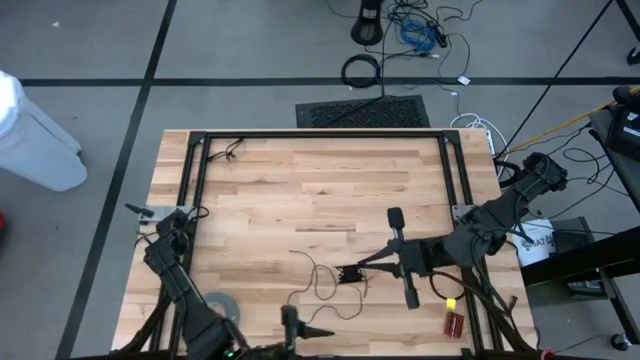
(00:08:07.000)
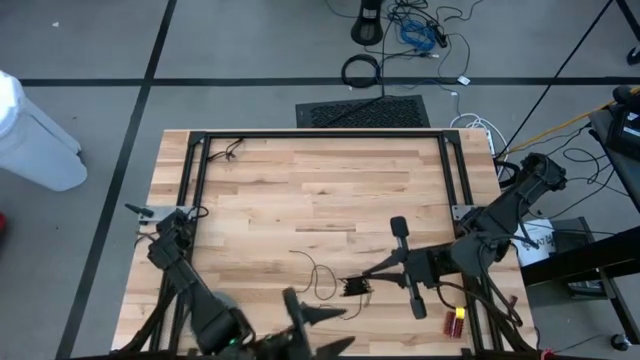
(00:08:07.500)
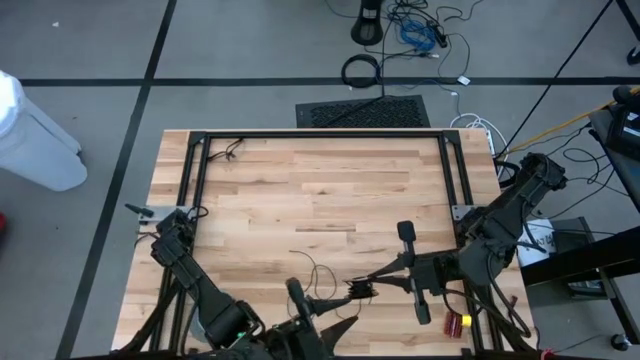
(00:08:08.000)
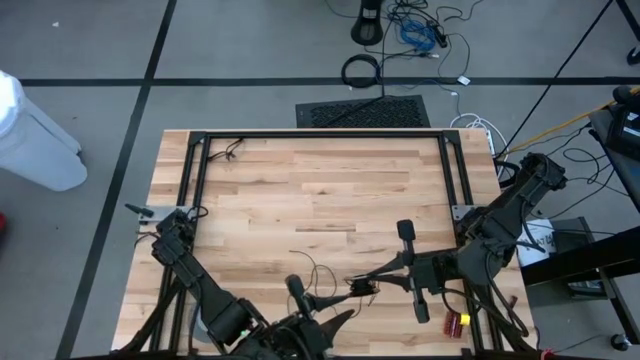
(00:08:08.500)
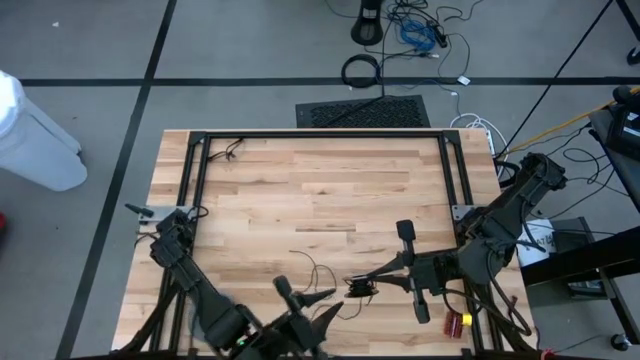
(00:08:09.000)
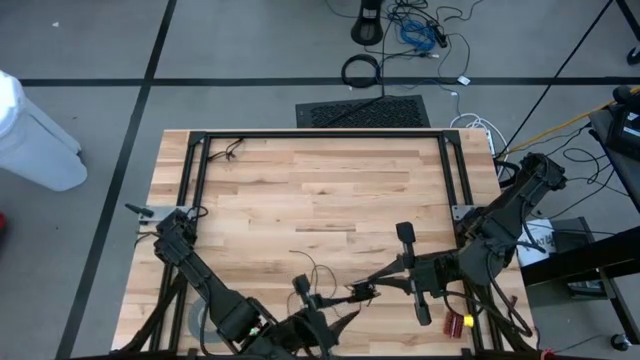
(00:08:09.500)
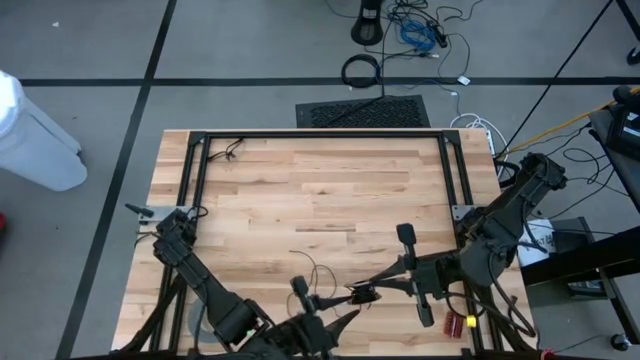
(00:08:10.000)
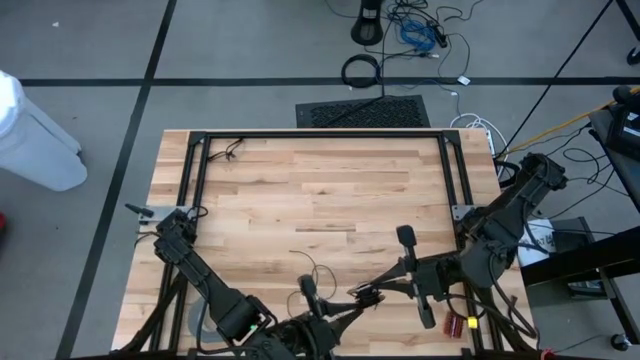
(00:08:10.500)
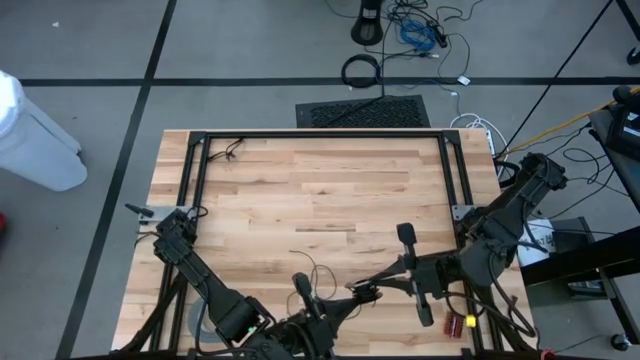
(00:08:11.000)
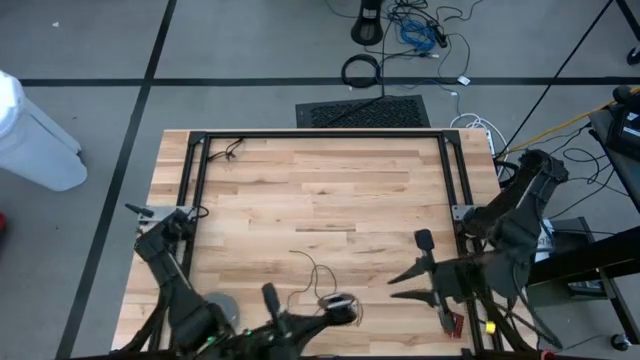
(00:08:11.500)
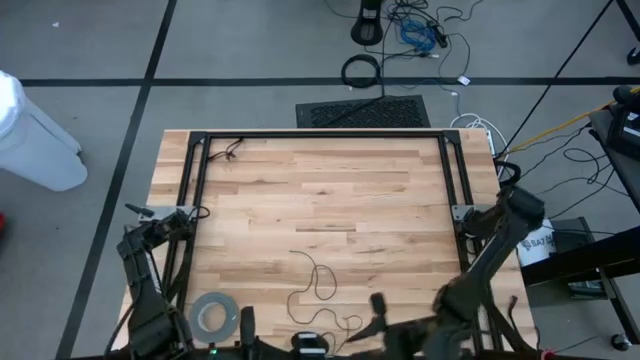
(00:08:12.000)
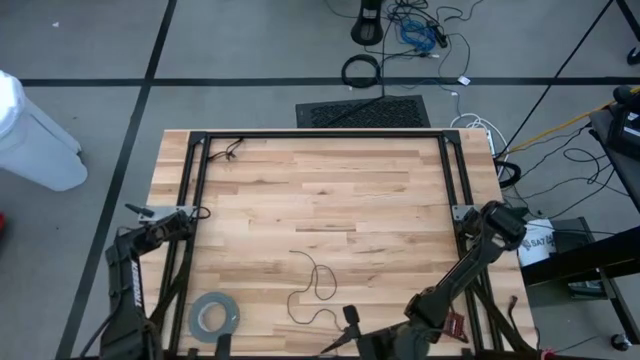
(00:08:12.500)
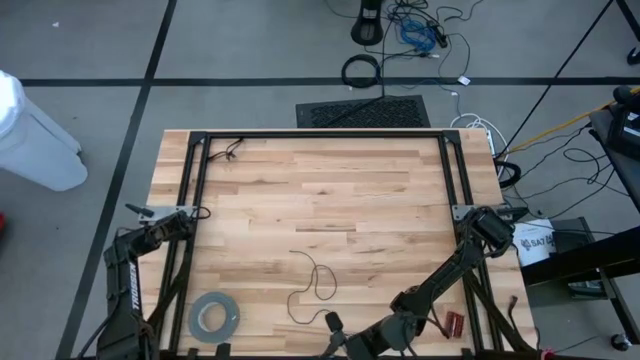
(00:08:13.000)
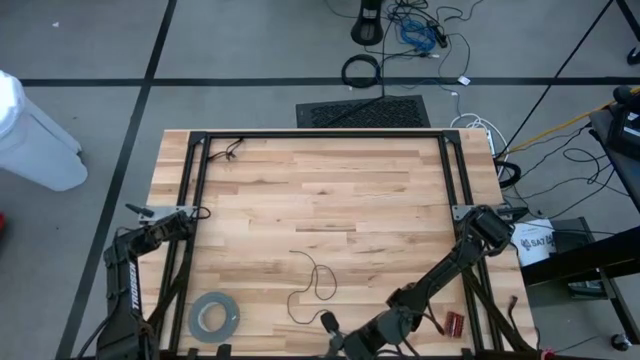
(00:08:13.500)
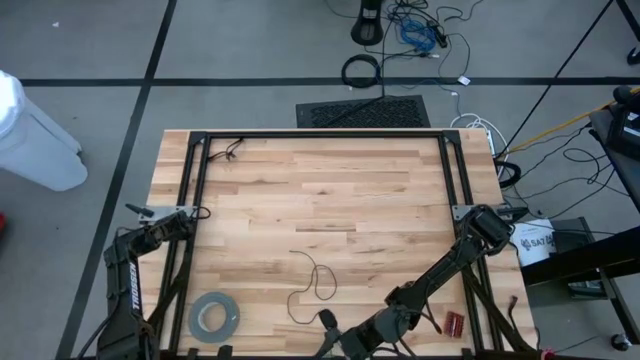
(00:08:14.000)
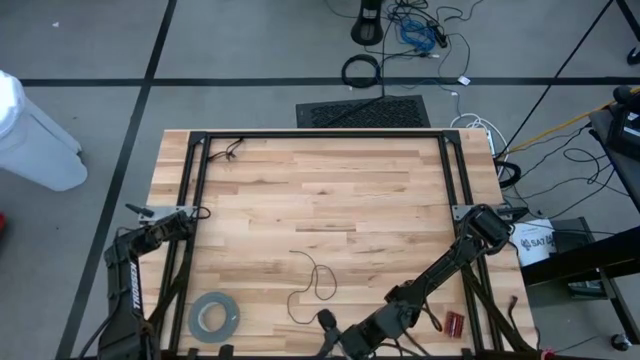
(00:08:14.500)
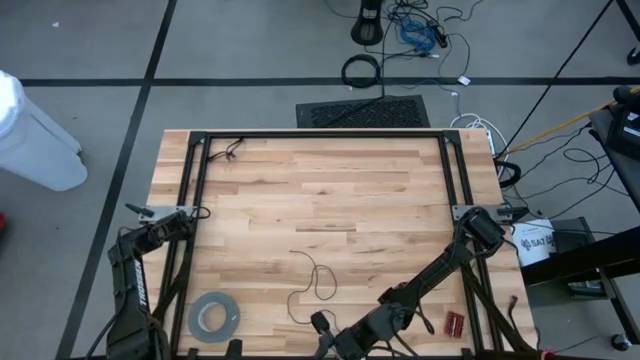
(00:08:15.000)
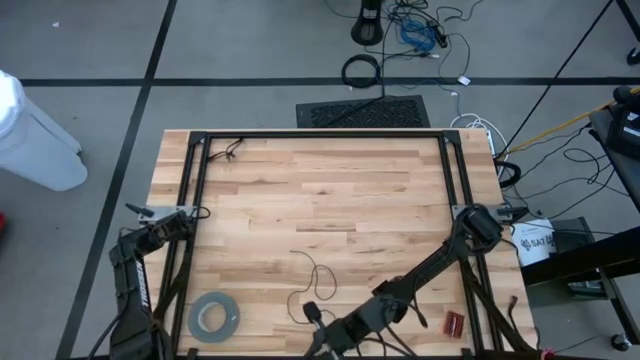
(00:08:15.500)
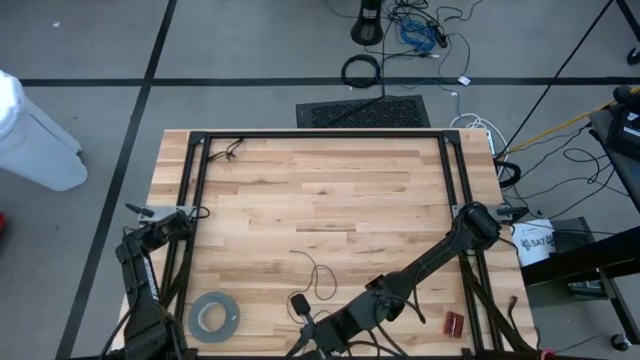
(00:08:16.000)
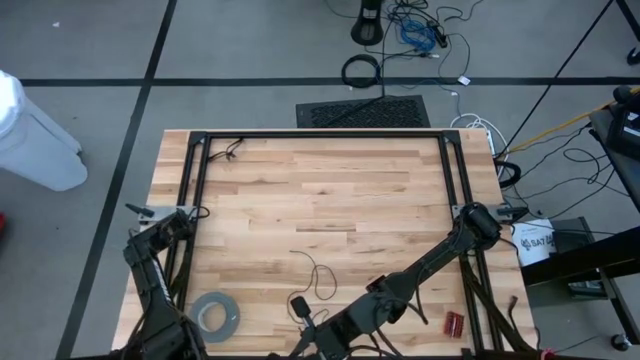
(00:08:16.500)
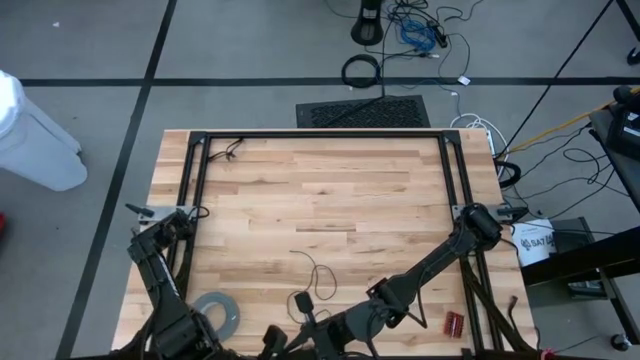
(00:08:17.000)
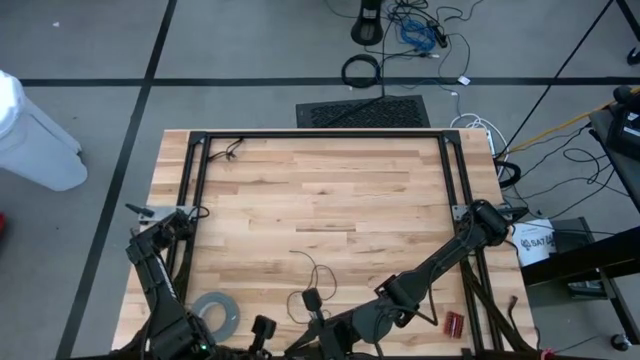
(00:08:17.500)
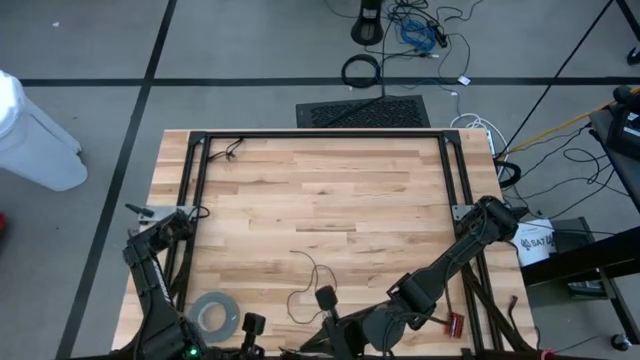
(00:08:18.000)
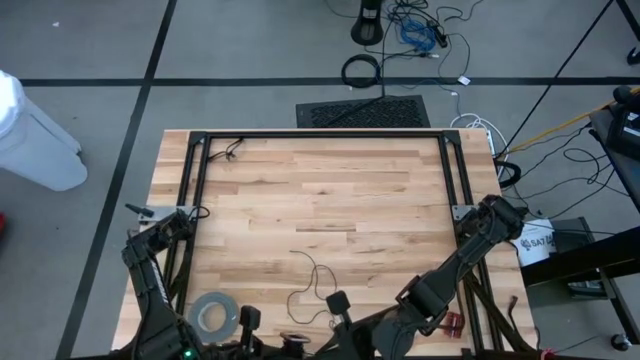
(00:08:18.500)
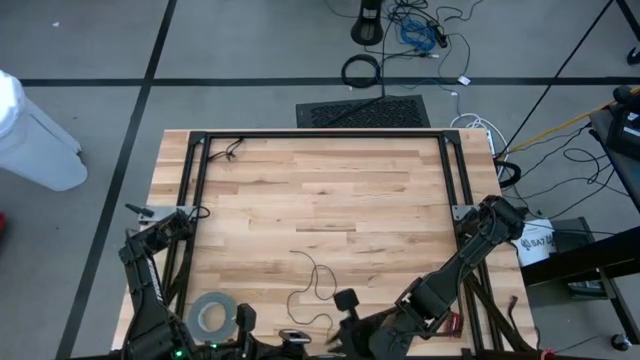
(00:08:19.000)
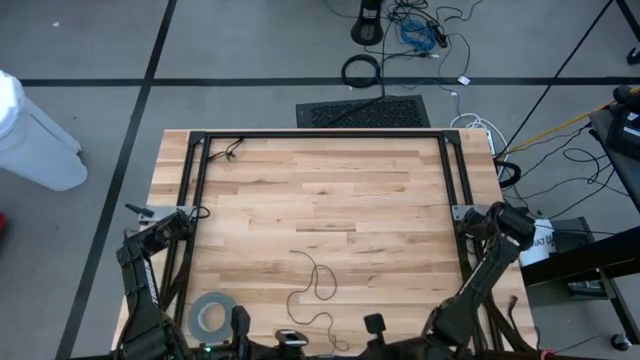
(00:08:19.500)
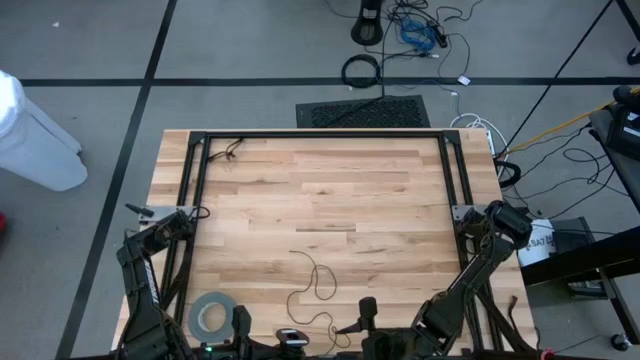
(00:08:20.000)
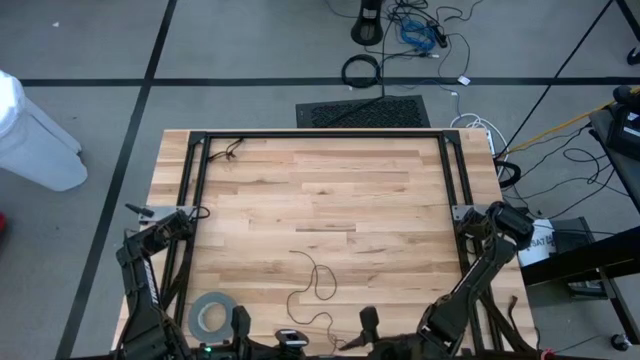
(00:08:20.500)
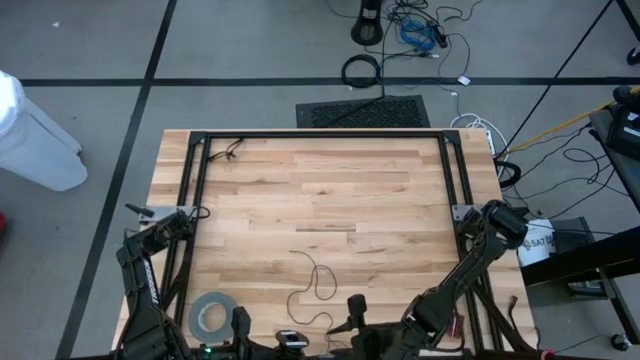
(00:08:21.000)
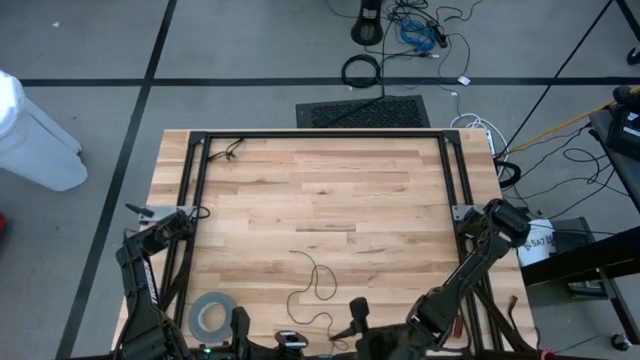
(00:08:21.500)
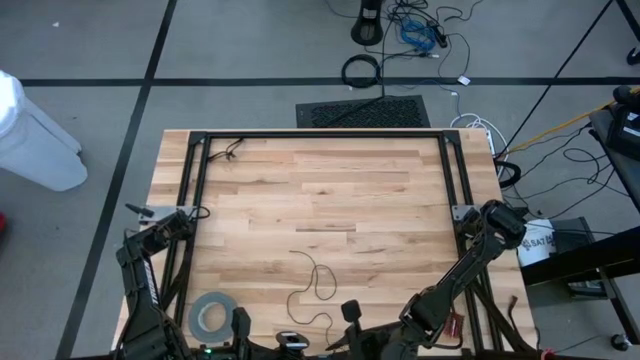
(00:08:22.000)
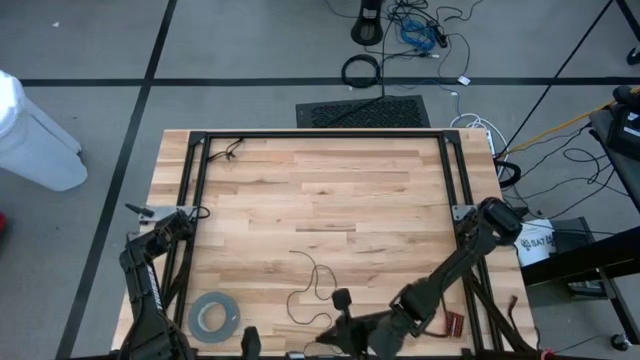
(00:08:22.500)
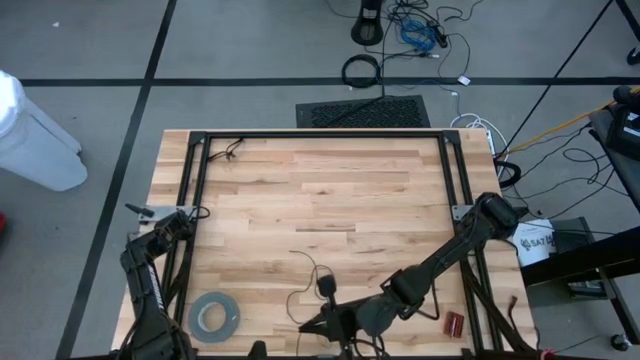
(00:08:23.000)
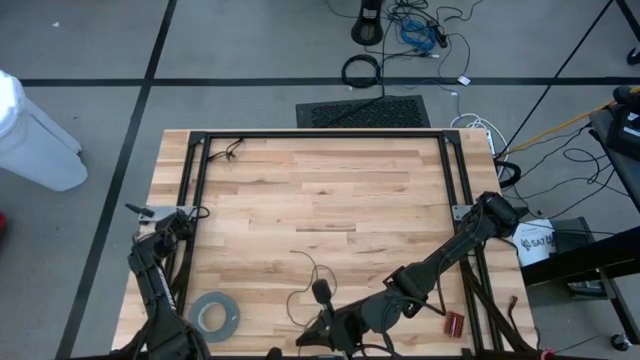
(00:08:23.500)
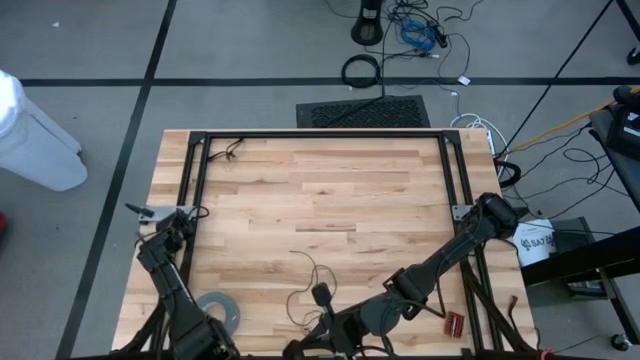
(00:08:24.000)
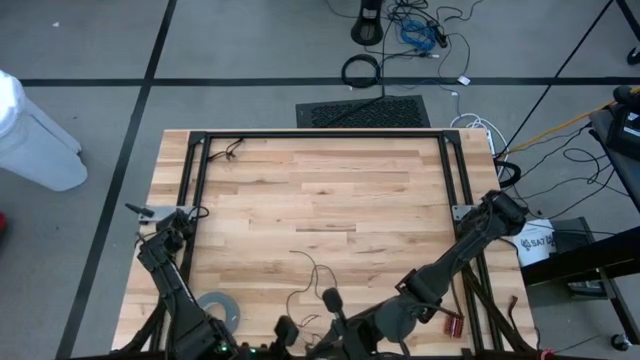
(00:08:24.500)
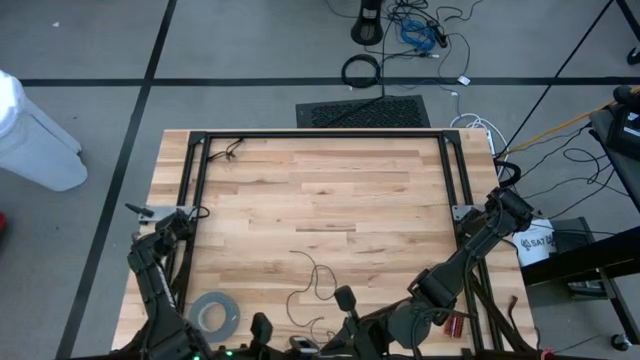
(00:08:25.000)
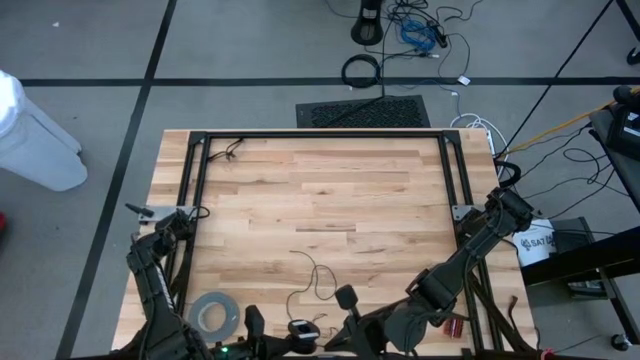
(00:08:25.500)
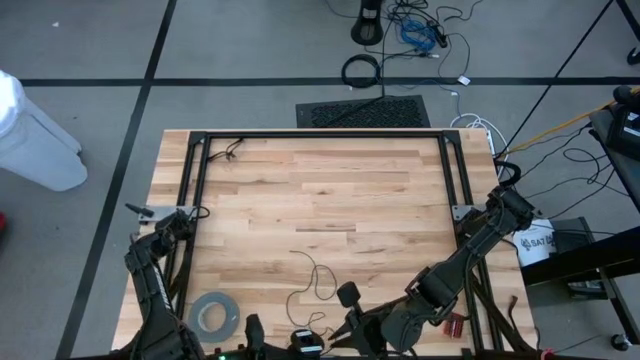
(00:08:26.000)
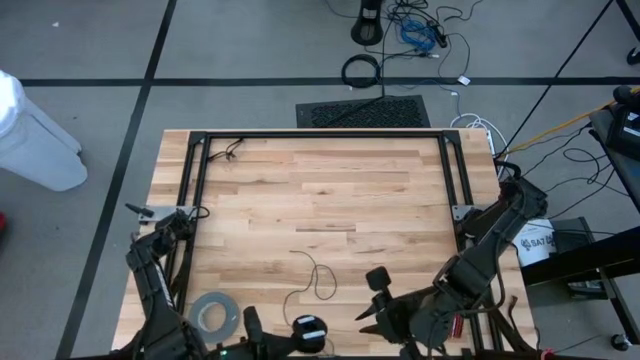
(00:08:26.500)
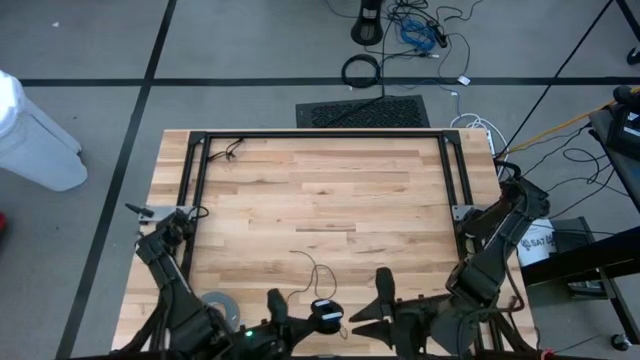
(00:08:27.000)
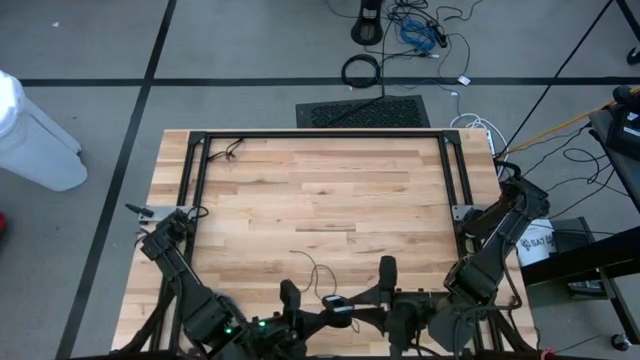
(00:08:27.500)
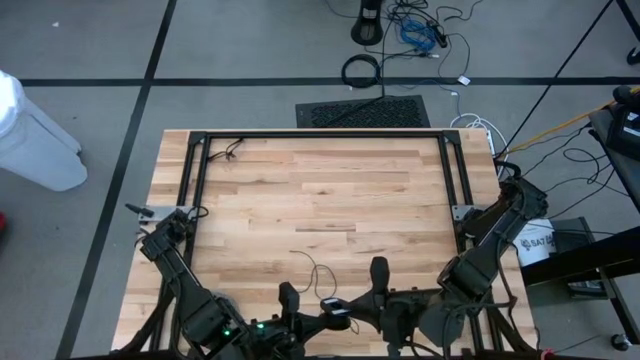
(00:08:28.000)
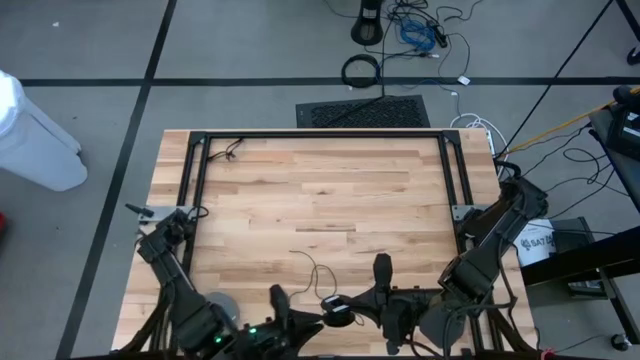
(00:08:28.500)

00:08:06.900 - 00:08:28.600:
Task: Coil cords
Coil the black wire onto the spool
